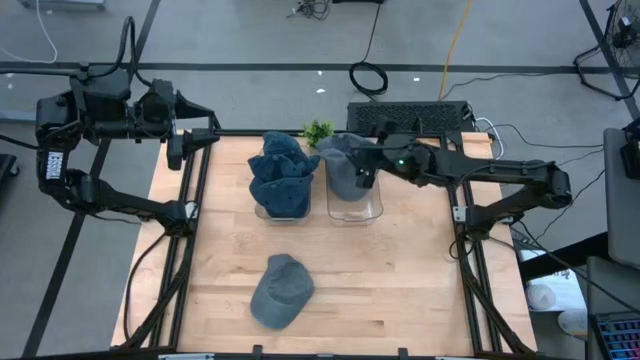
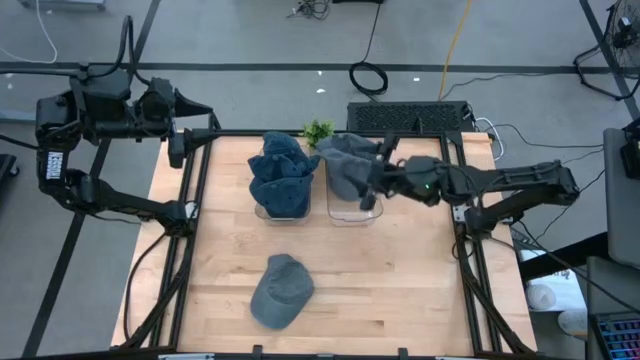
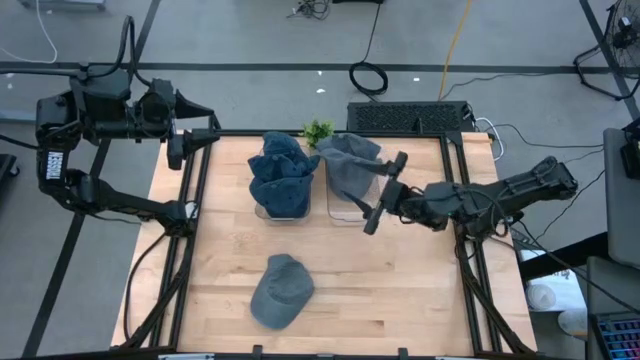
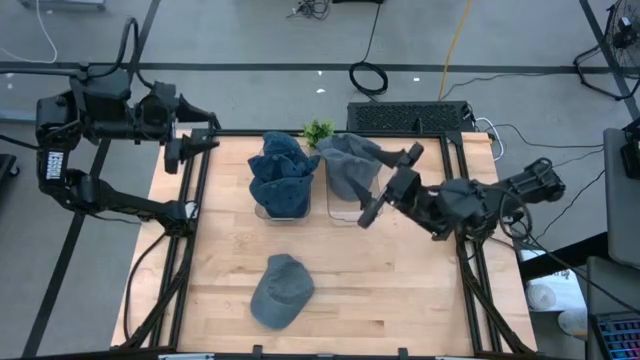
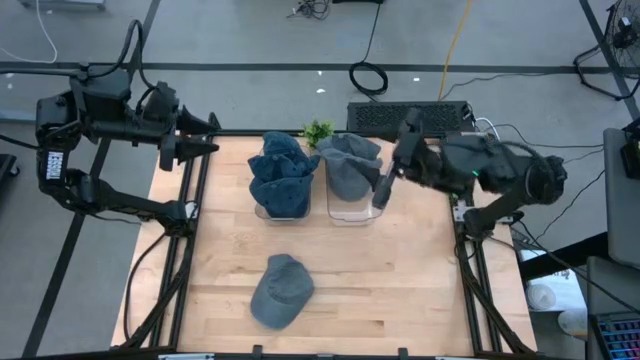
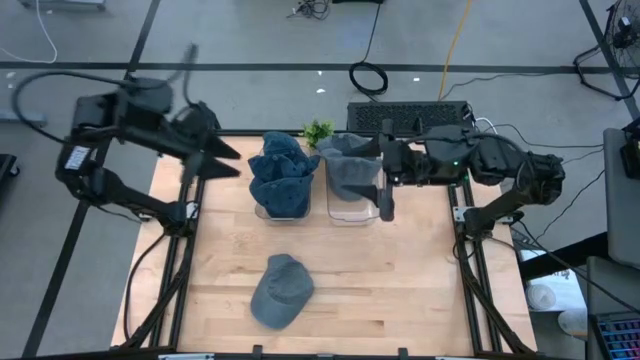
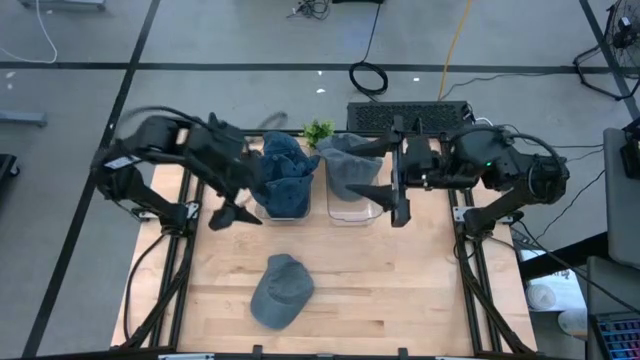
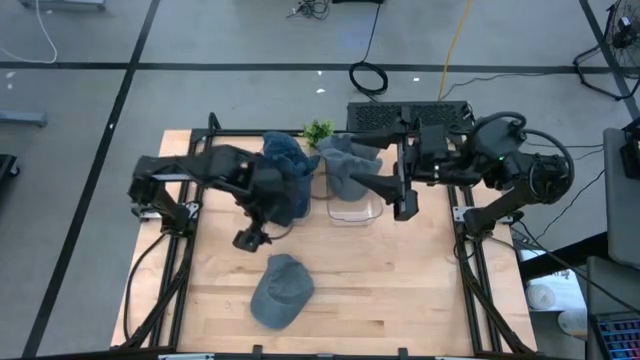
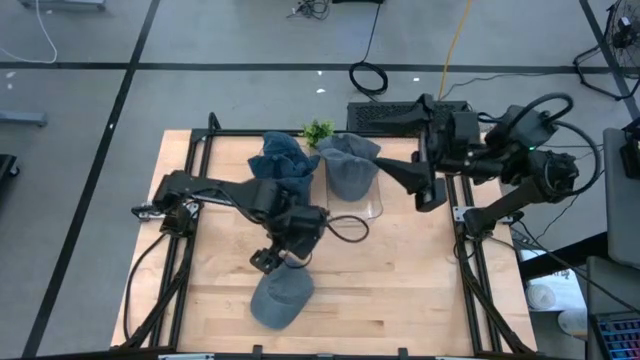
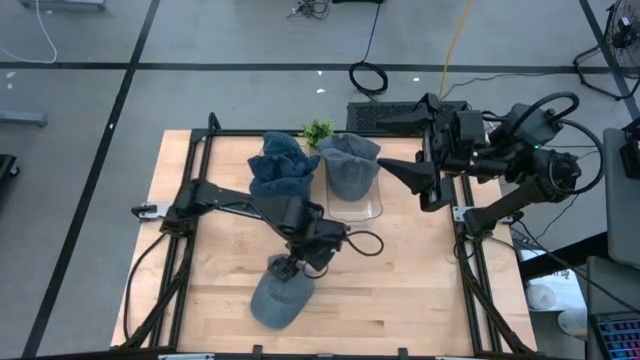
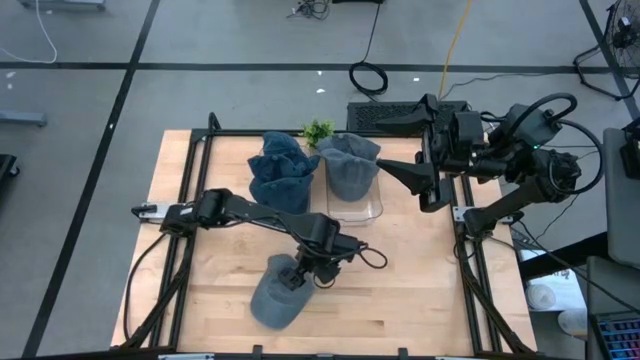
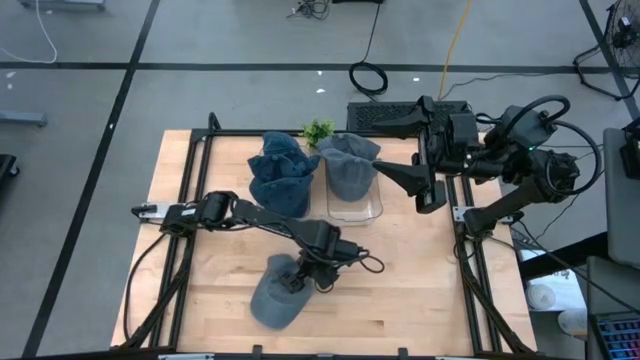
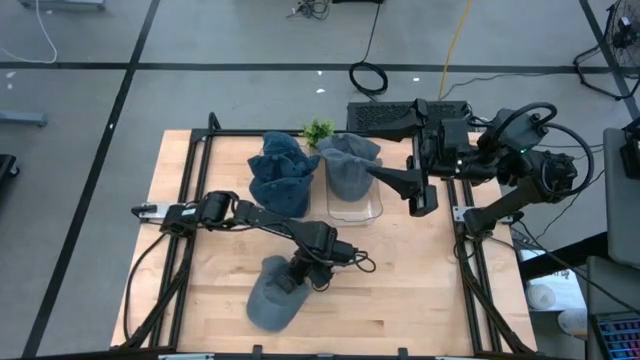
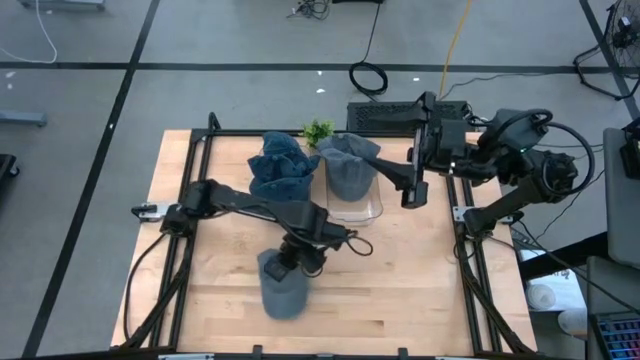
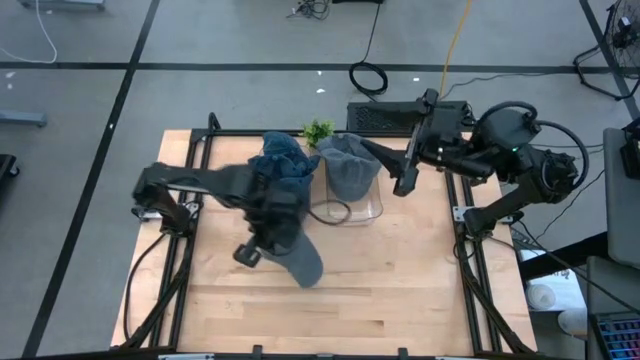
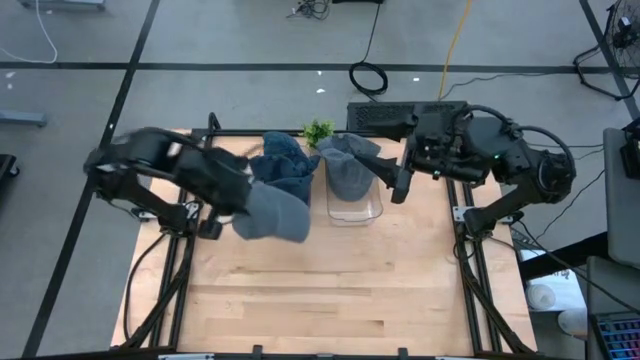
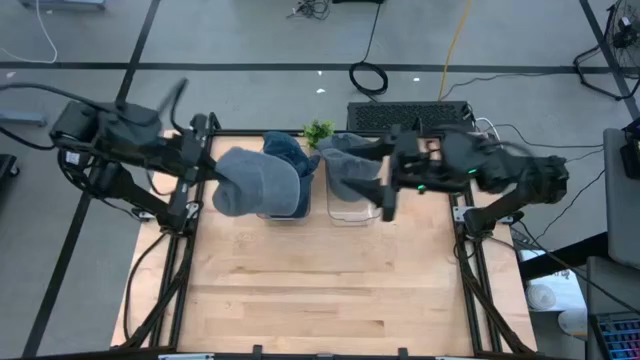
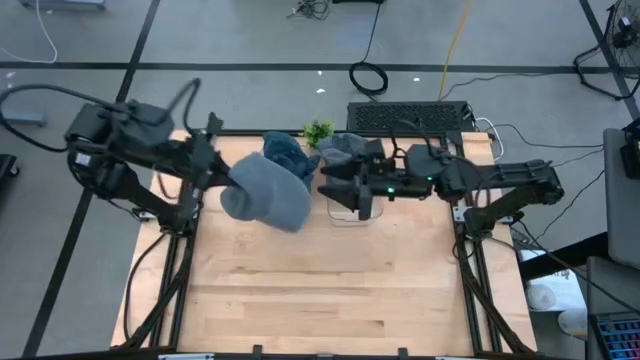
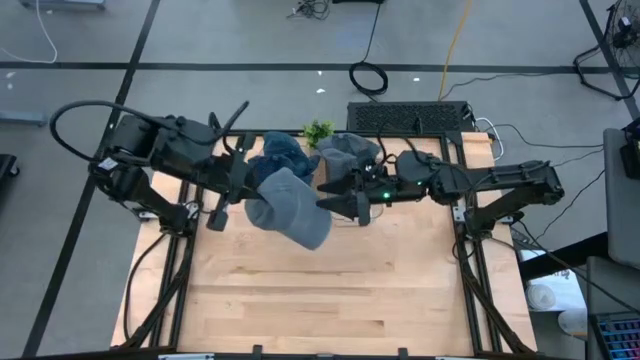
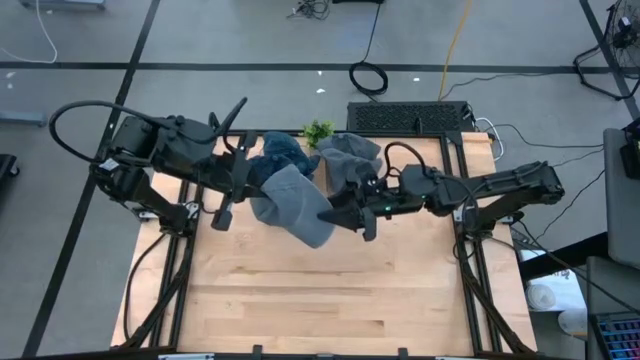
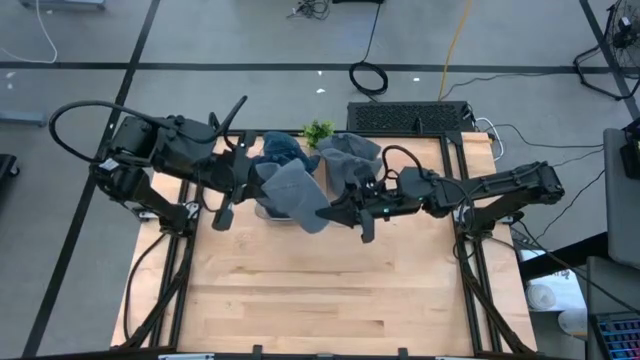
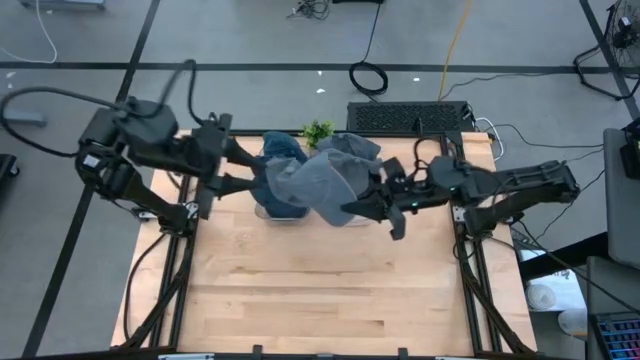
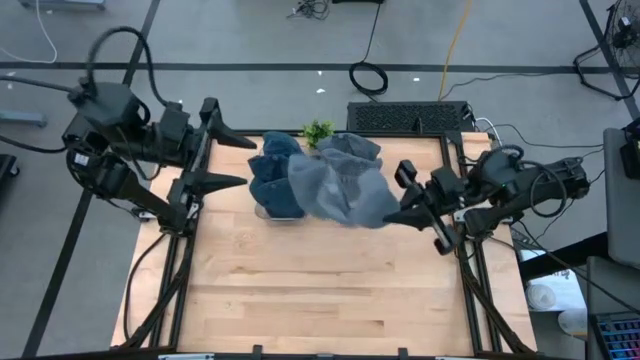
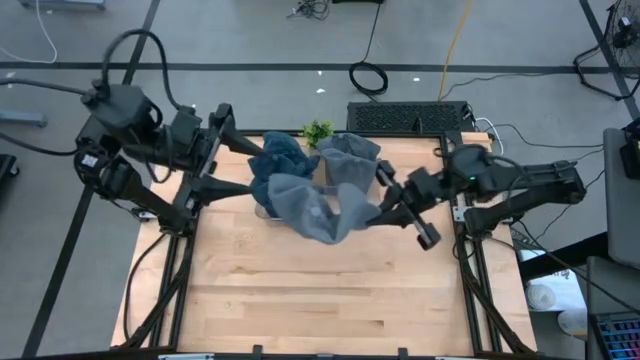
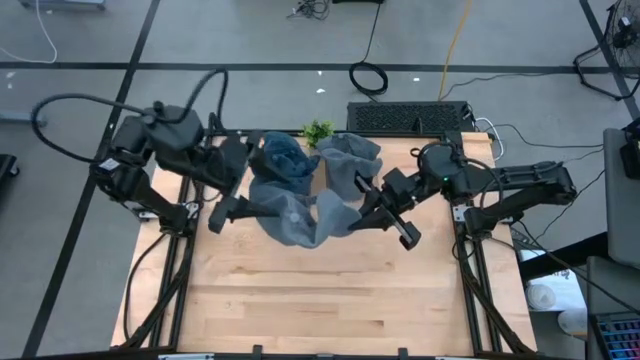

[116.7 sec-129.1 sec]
Task: Pick & Place hat
Put the gray cap into the right transparent bin

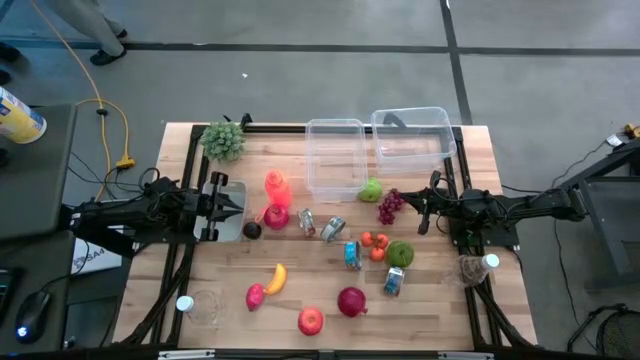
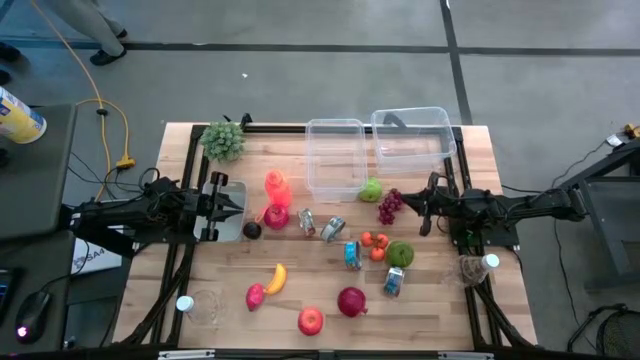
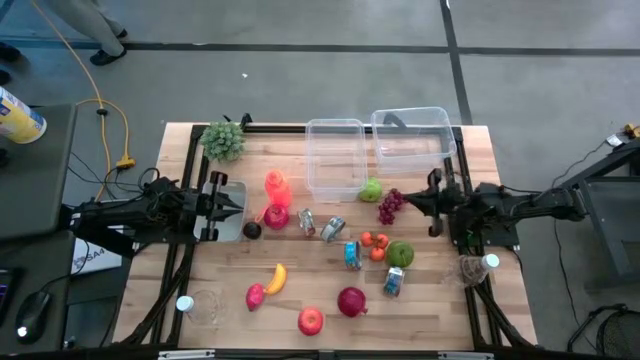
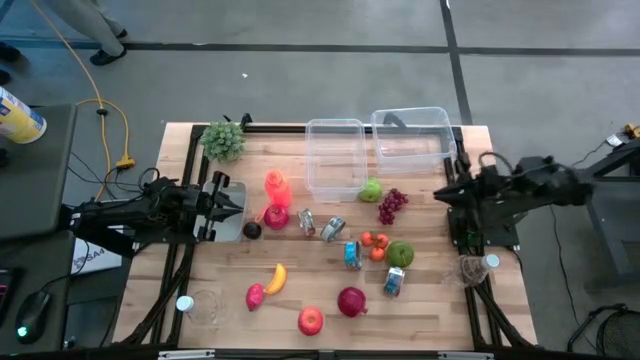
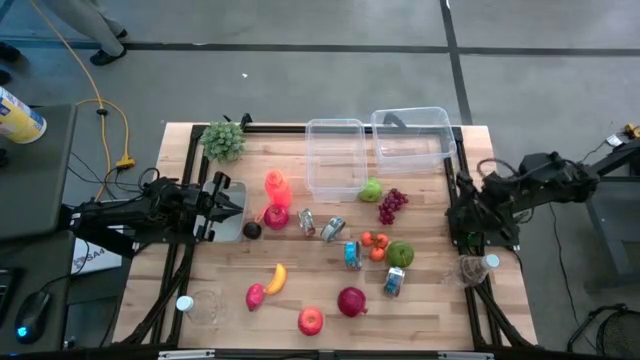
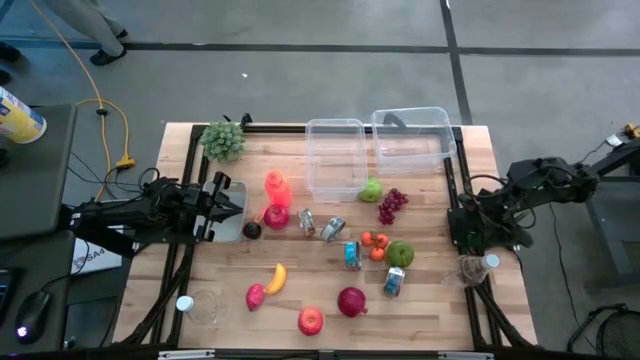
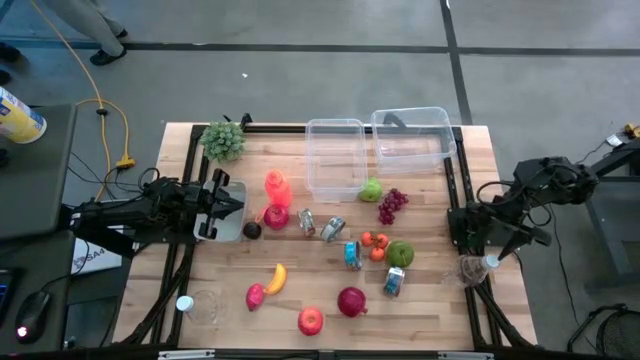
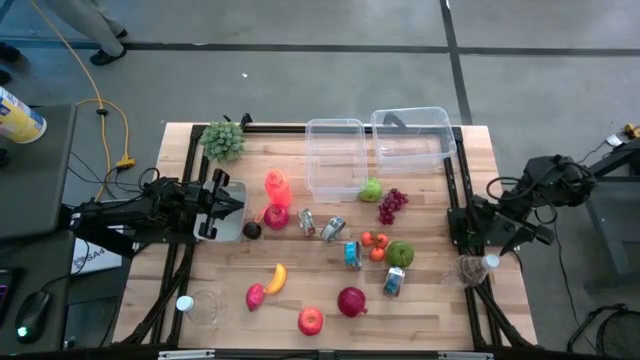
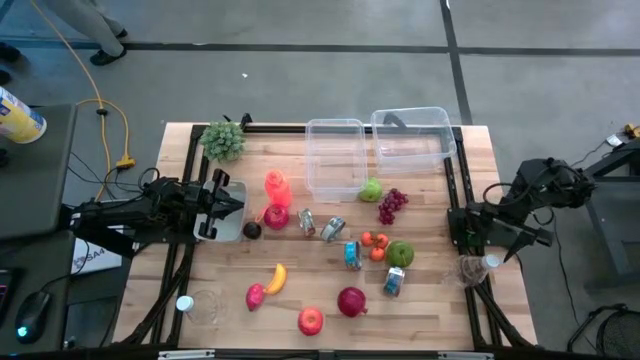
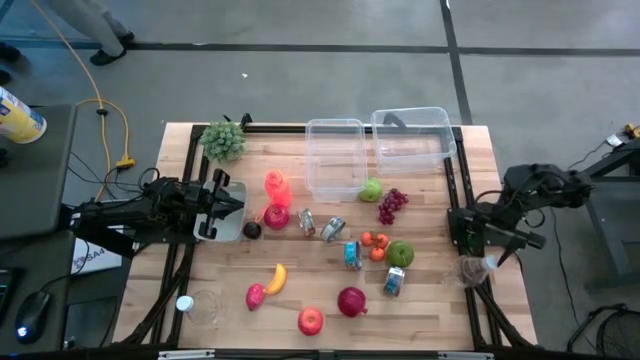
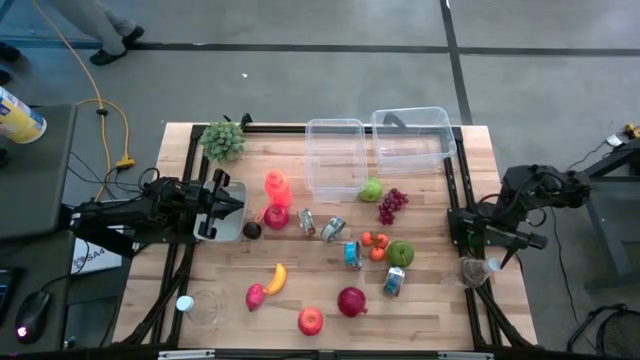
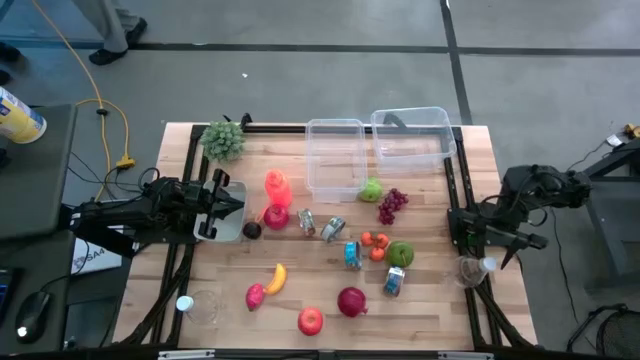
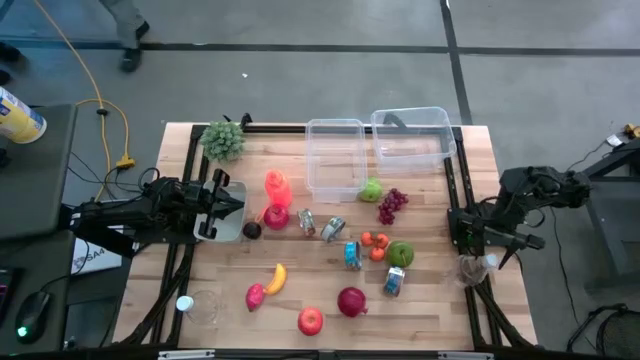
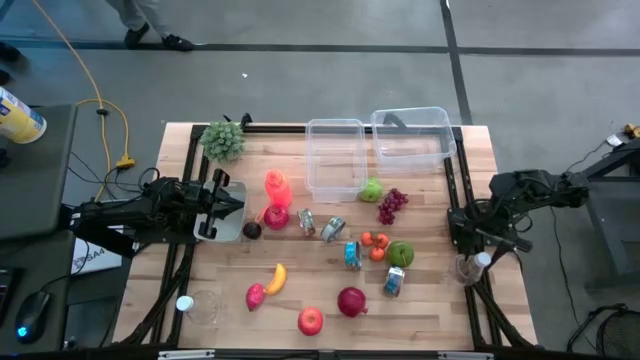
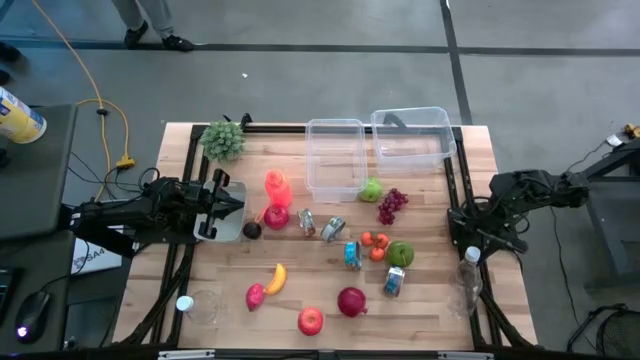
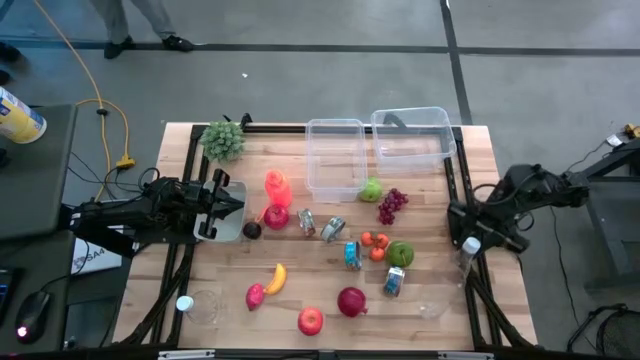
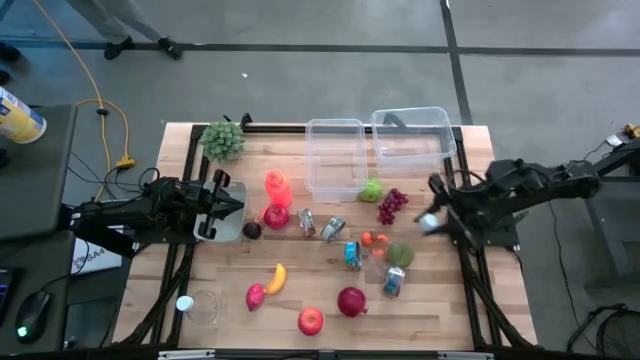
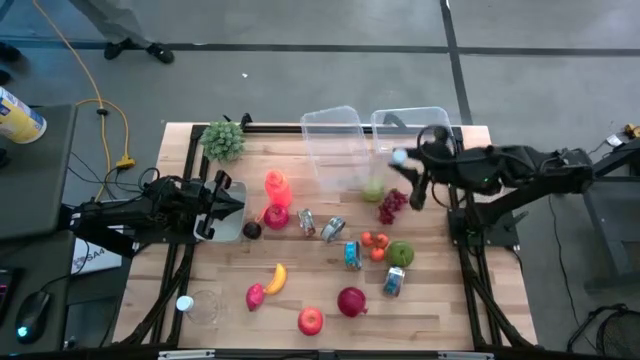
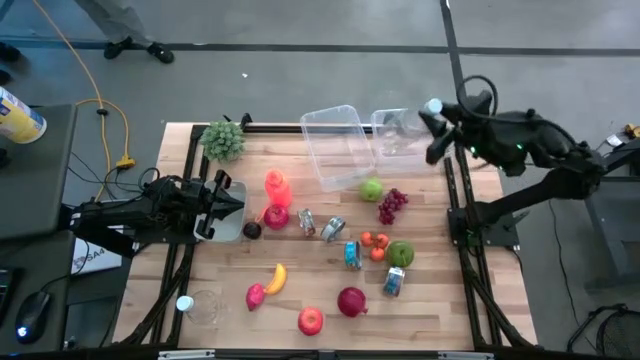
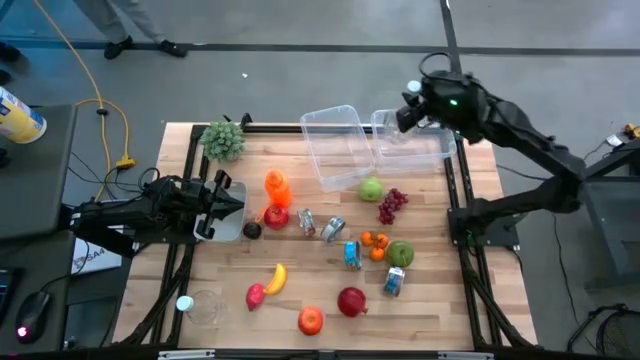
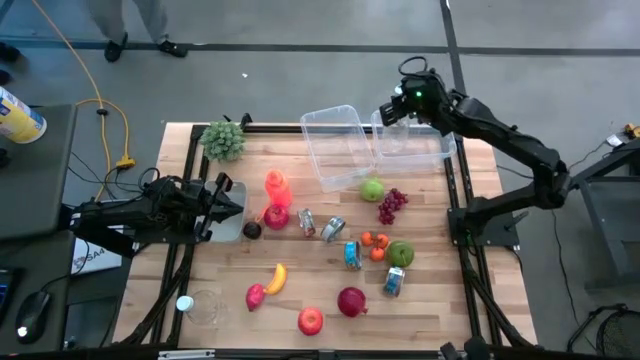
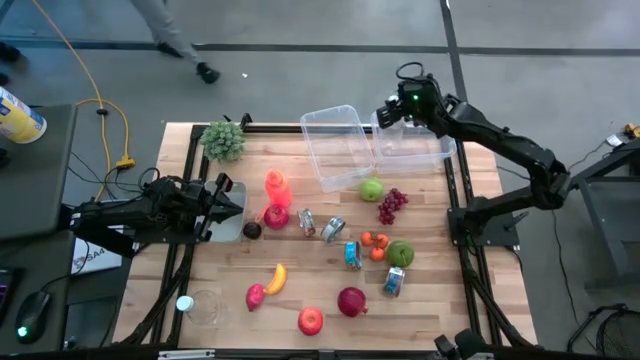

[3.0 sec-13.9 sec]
Task: Pick & Place Food Item
Put the right transparent bottle into the right transparent bin
